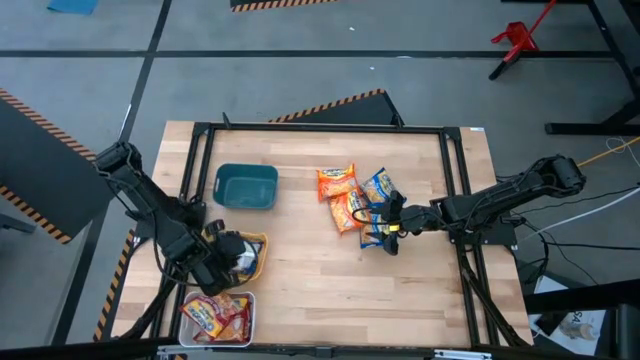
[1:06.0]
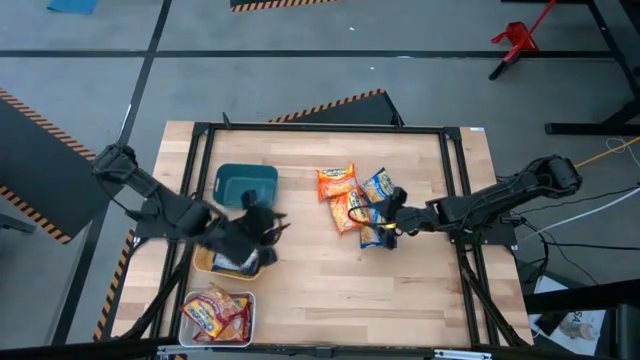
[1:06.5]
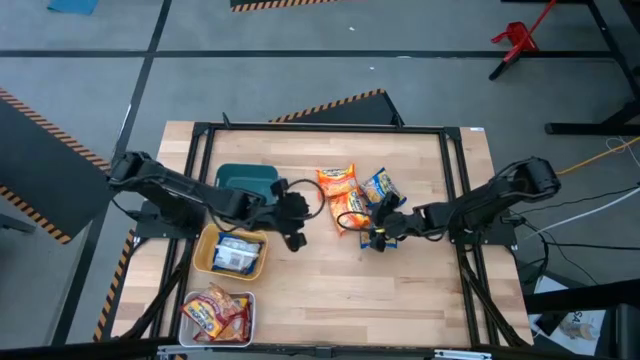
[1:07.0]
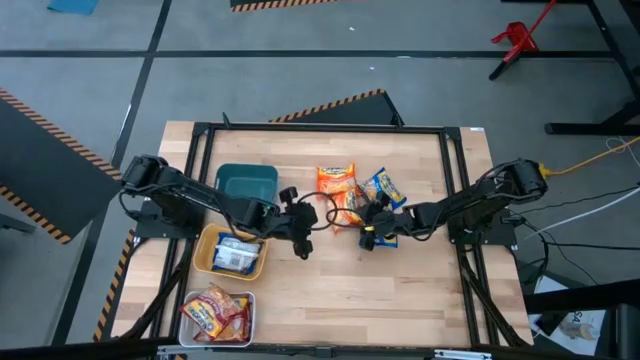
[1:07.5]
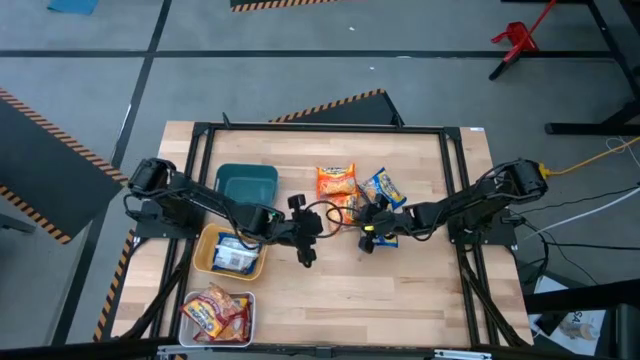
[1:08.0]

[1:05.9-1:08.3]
Task: Sort Maruchan noodles
Put the bottom orange noodle pack into the blue bin

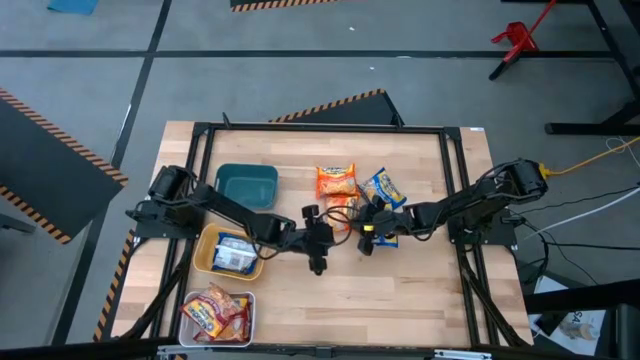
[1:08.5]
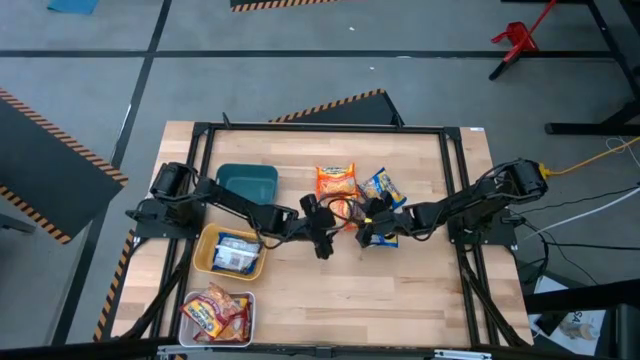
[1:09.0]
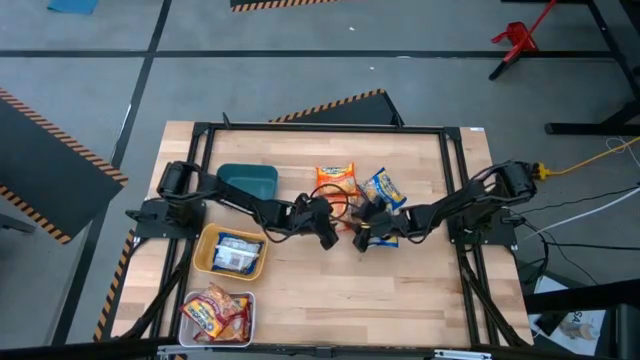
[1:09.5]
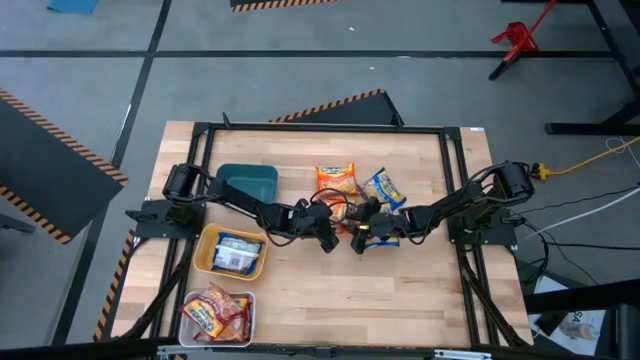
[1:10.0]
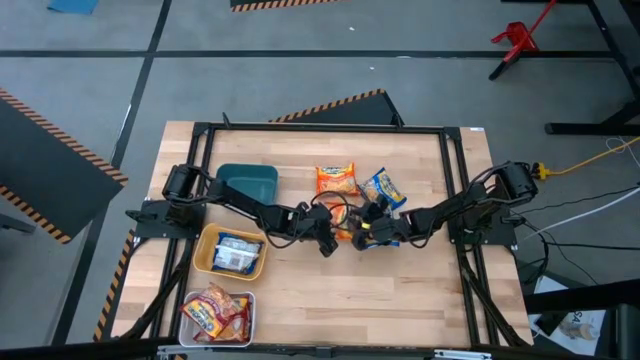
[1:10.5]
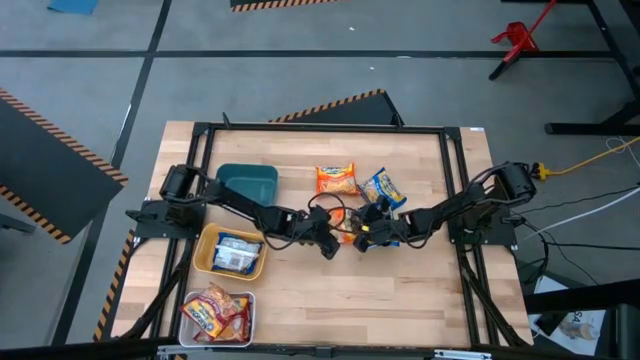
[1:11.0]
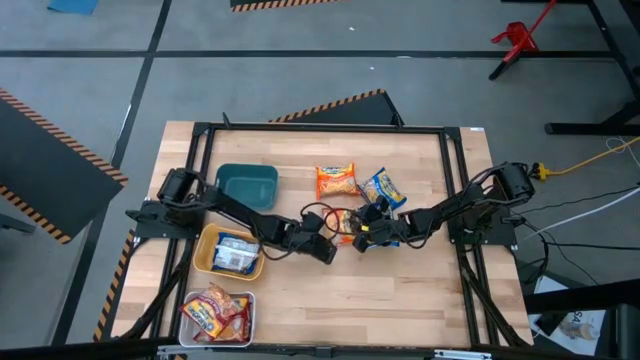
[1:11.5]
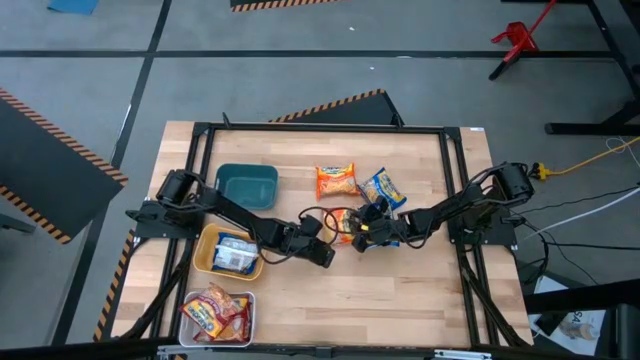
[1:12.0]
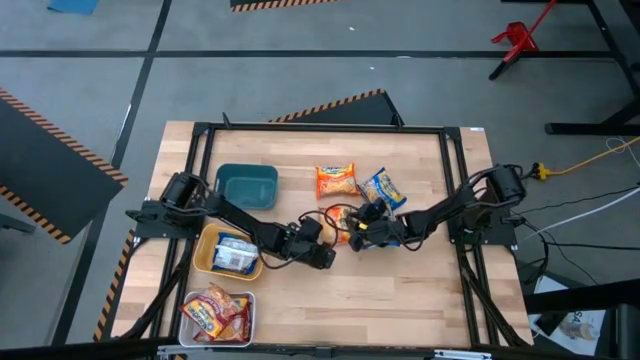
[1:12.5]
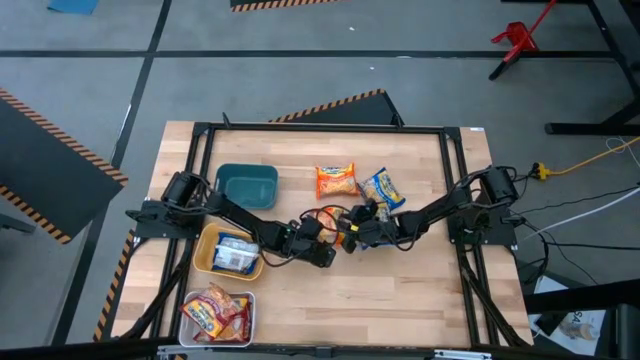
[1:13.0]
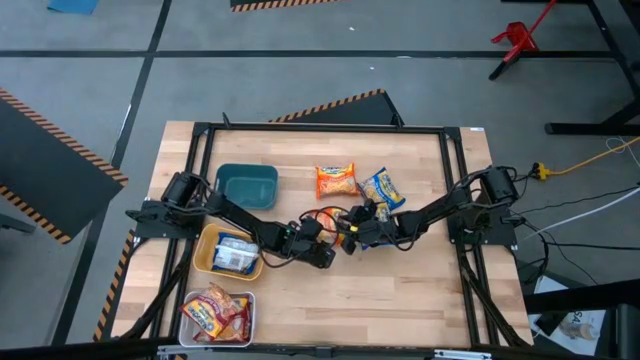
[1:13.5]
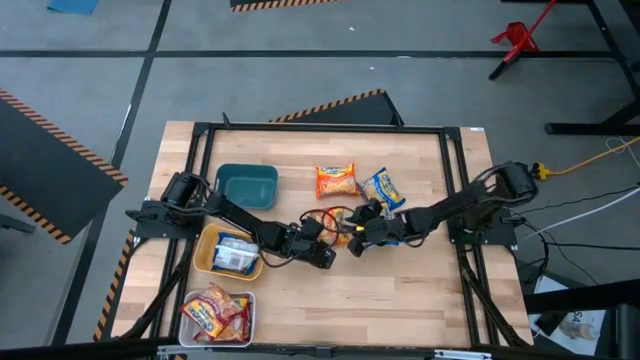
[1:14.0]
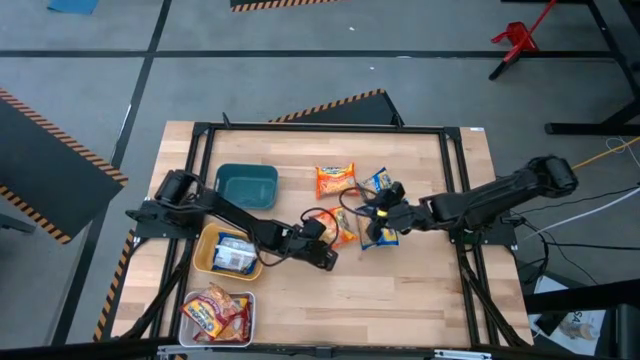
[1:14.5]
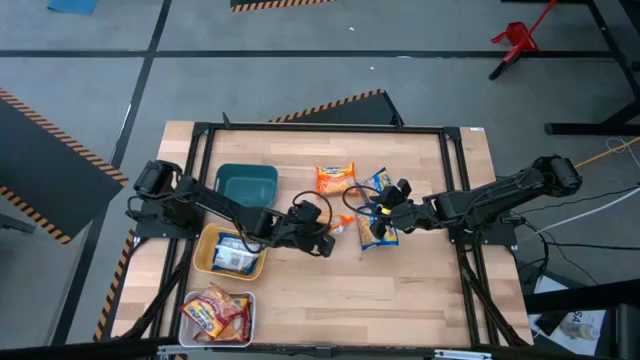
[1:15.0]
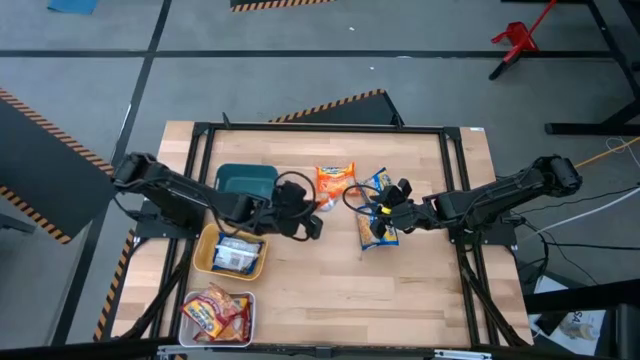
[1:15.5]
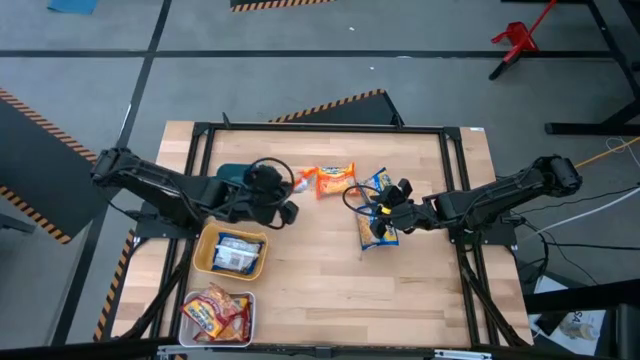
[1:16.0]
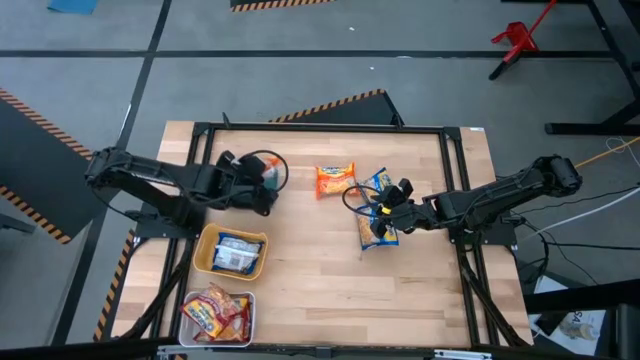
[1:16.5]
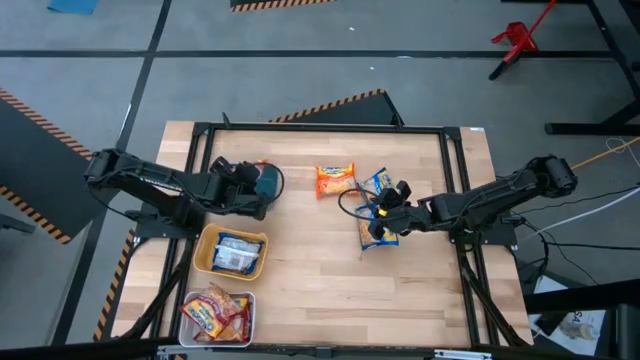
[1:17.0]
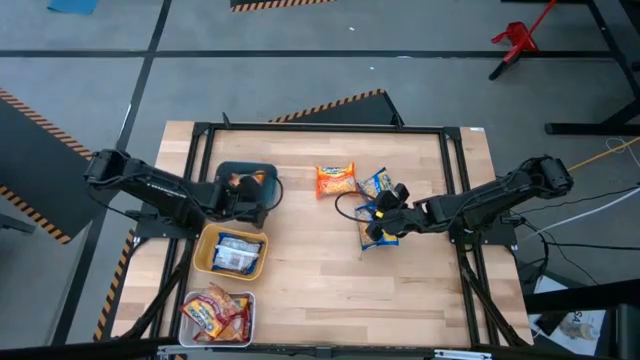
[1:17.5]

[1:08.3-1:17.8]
Put the bottom orange noodle pack into the blue bin

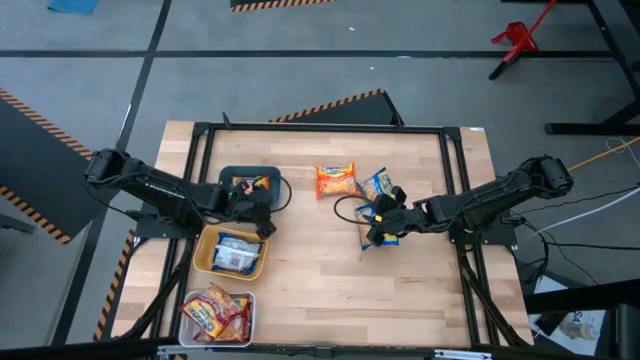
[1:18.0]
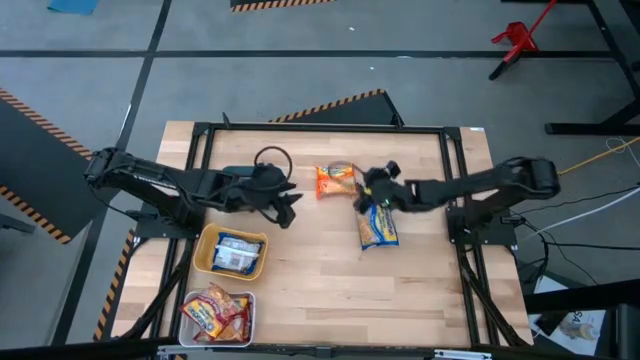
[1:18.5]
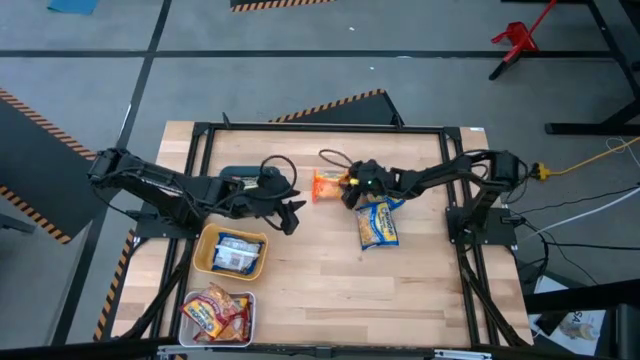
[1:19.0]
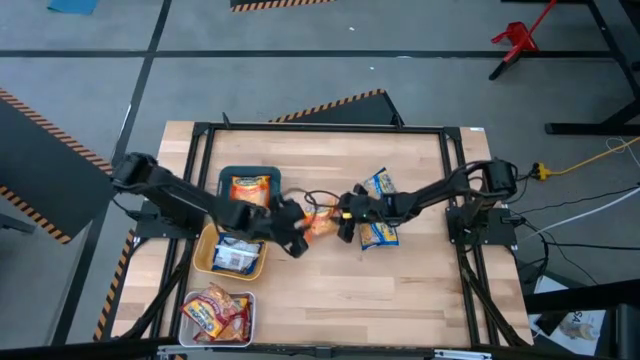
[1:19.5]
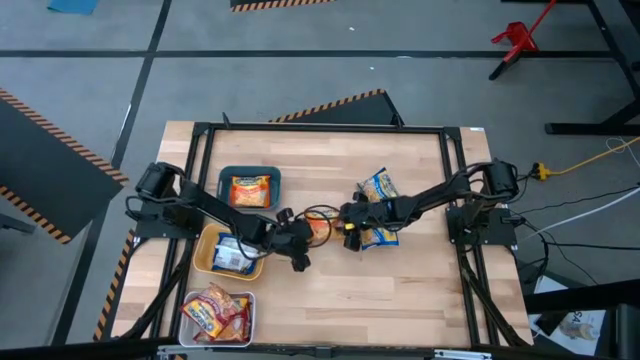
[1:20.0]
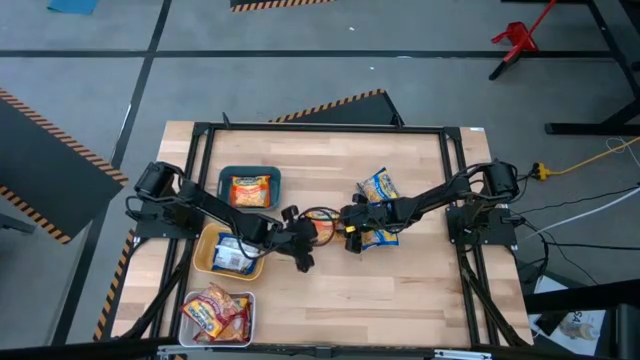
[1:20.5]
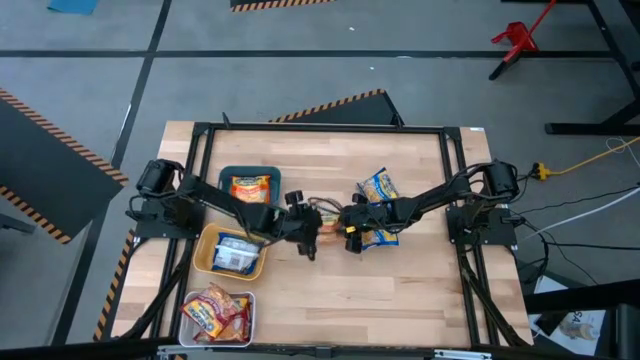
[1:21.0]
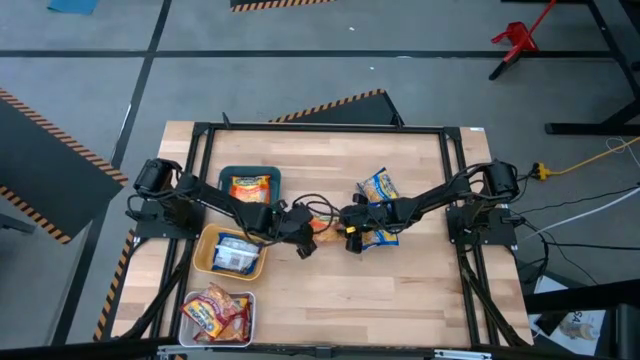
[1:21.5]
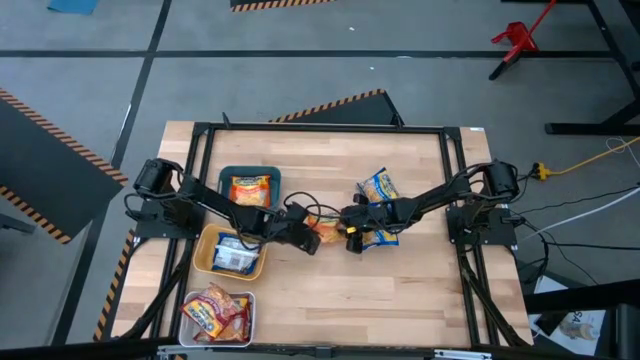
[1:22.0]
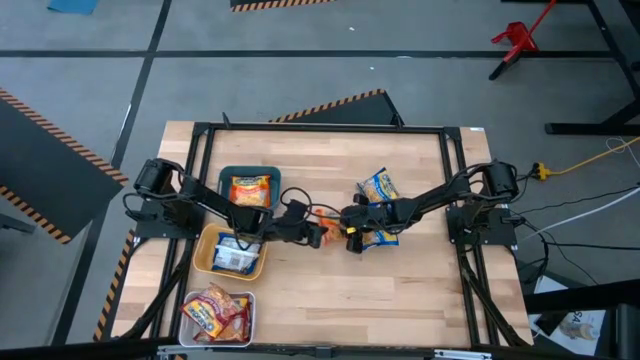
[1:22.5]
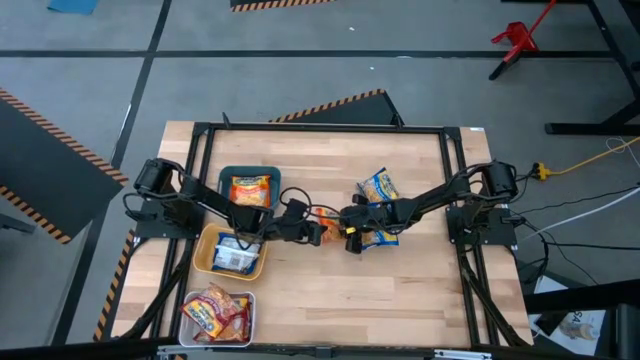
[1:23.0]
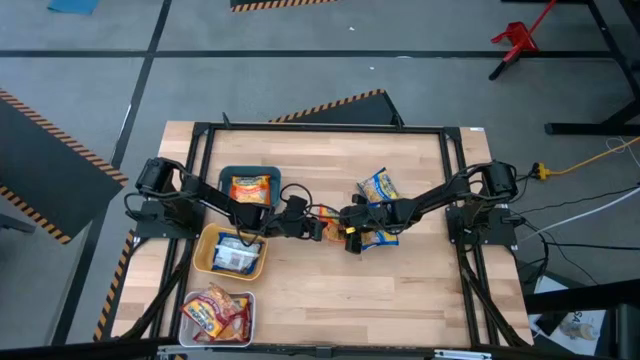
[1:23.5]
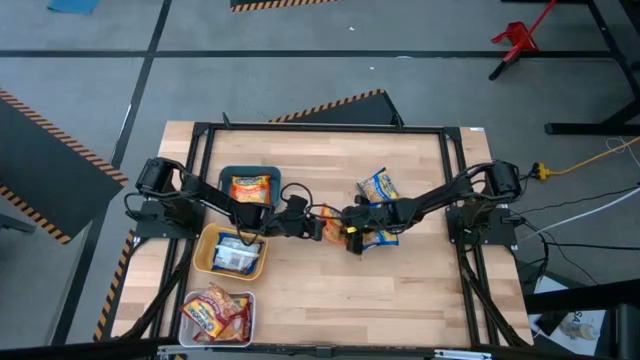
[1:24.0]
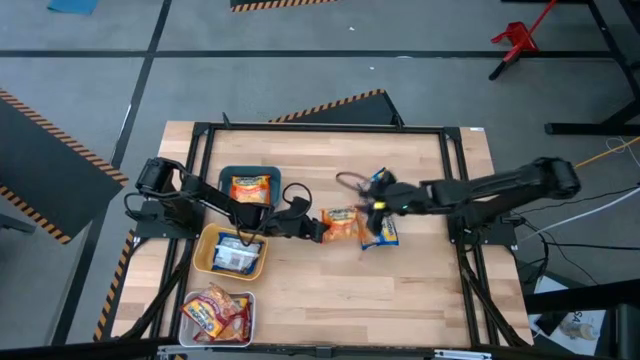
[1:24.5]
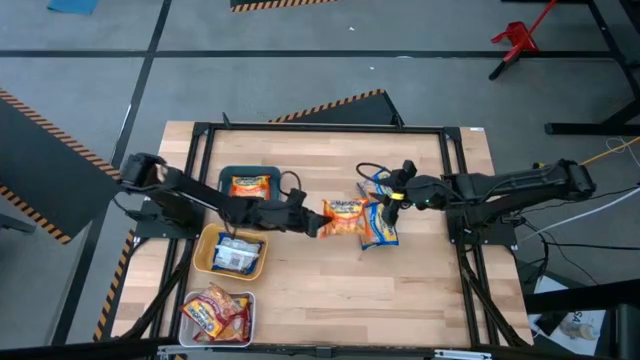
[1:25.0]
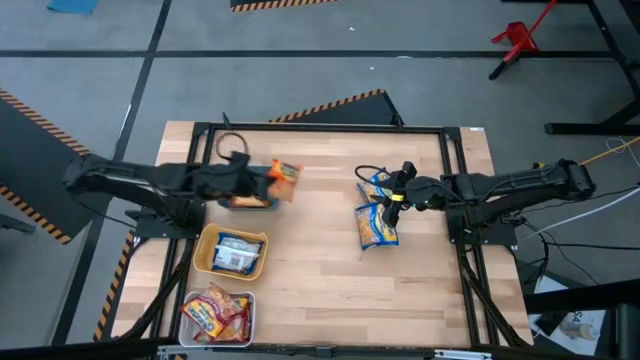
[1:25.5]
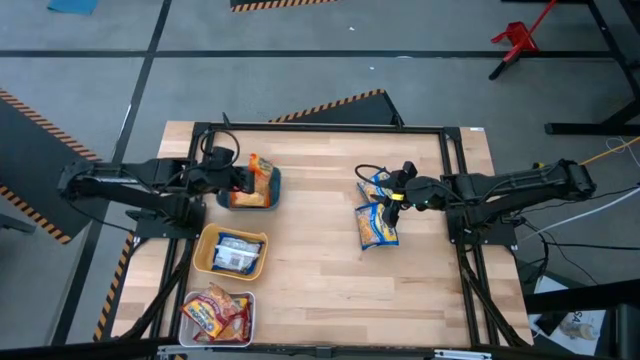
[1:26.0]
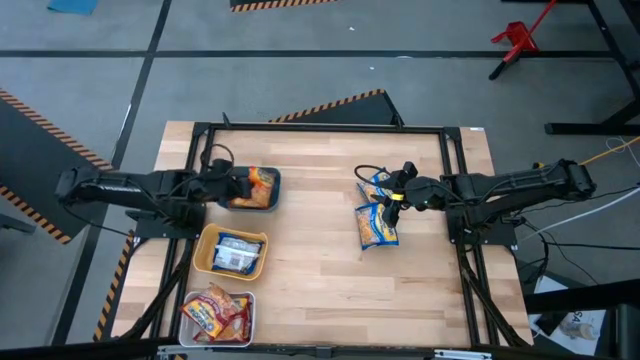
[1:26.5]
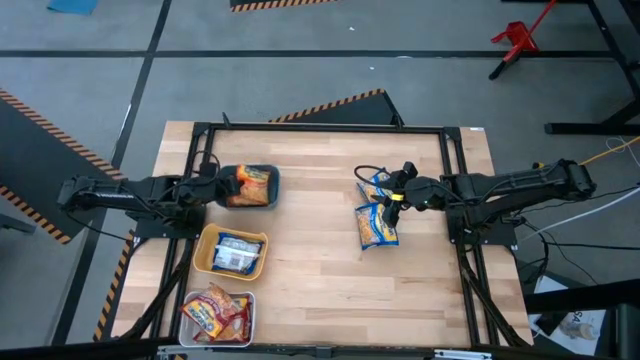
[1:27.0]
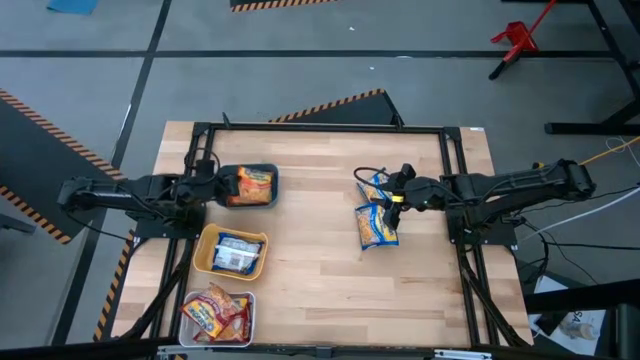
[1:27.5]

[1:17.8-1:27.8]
Put the orange noodle pack into the blue bin
